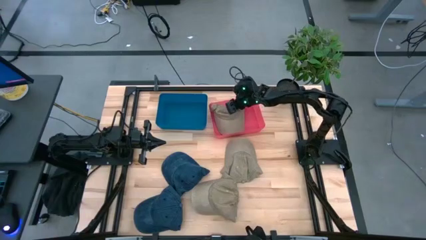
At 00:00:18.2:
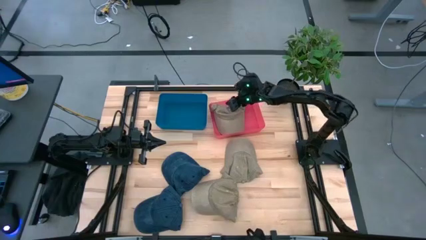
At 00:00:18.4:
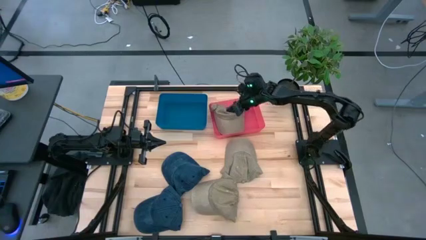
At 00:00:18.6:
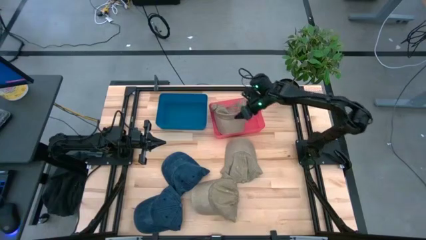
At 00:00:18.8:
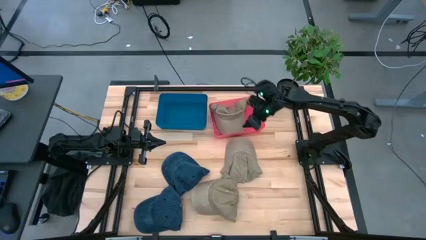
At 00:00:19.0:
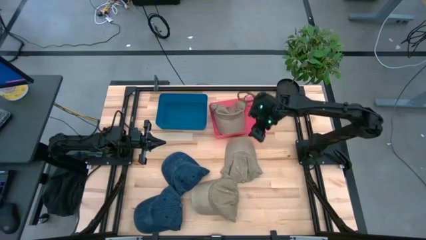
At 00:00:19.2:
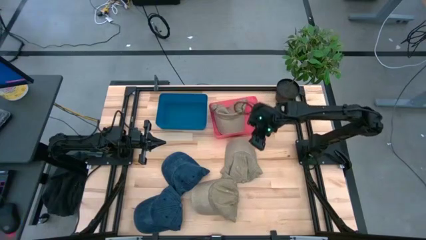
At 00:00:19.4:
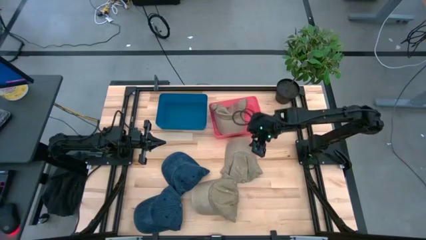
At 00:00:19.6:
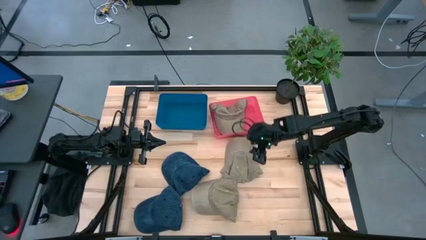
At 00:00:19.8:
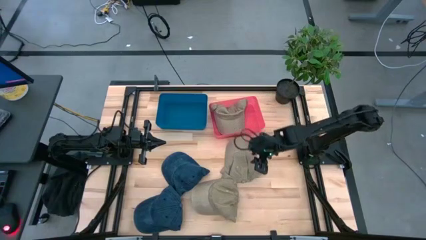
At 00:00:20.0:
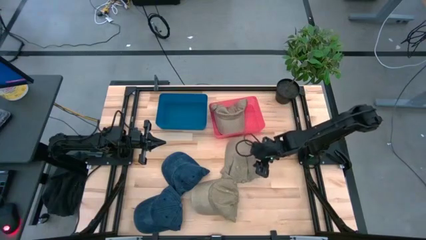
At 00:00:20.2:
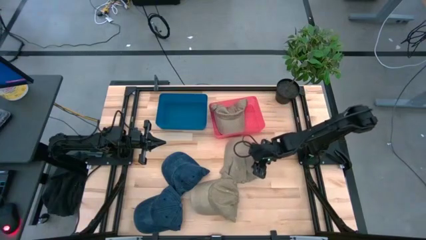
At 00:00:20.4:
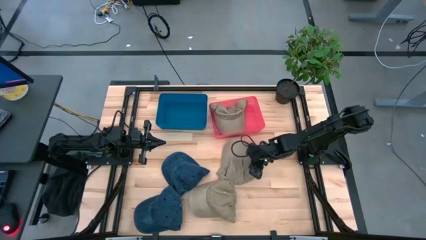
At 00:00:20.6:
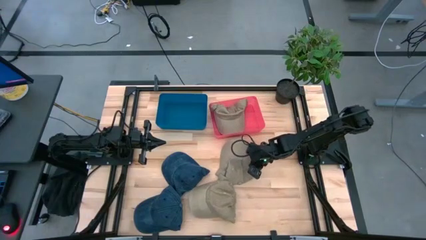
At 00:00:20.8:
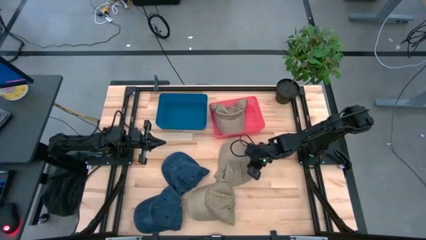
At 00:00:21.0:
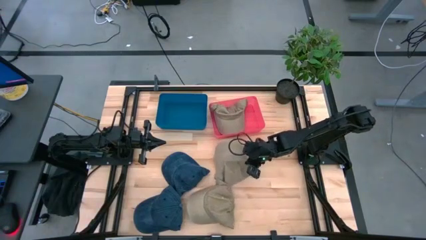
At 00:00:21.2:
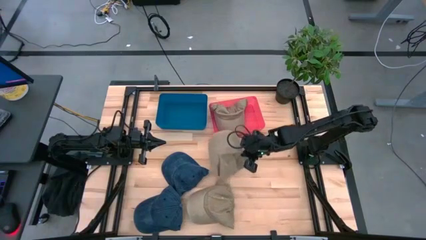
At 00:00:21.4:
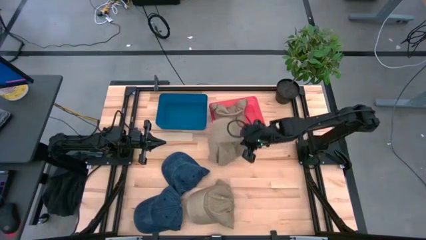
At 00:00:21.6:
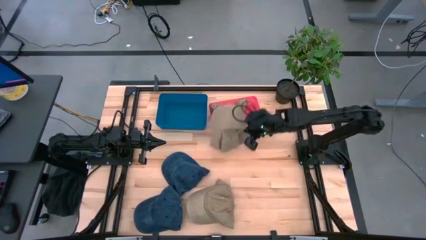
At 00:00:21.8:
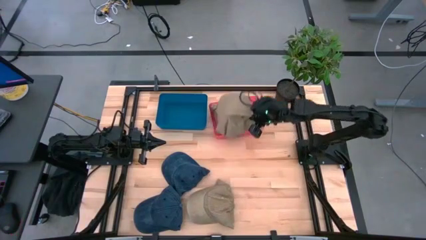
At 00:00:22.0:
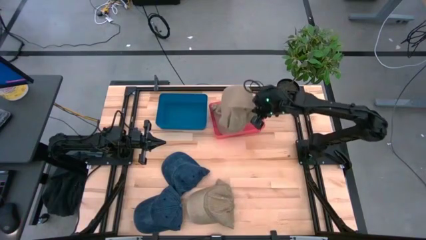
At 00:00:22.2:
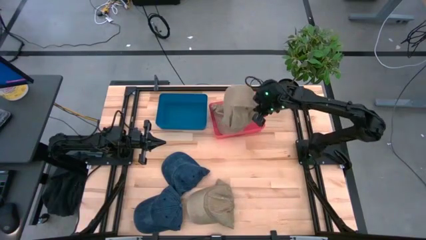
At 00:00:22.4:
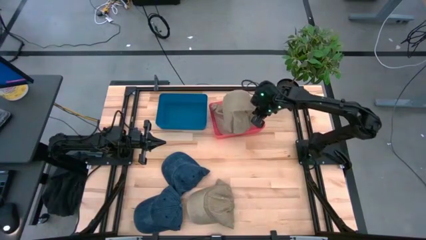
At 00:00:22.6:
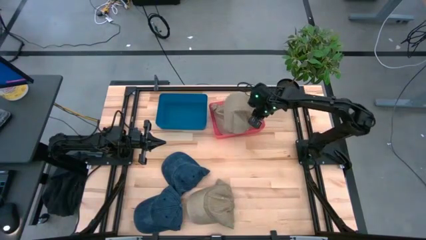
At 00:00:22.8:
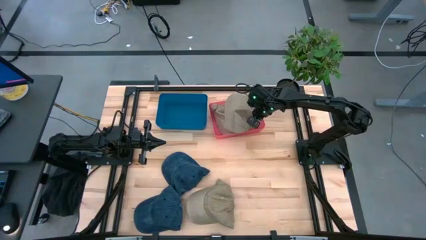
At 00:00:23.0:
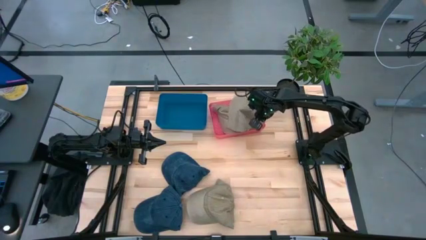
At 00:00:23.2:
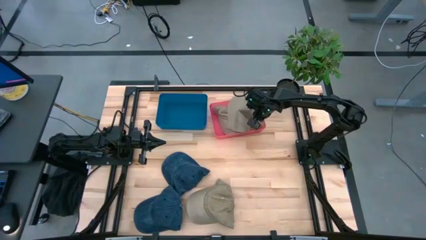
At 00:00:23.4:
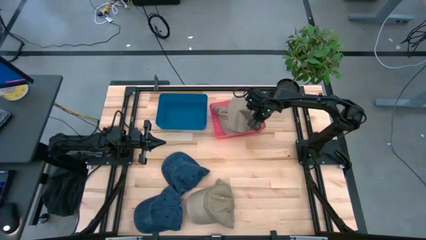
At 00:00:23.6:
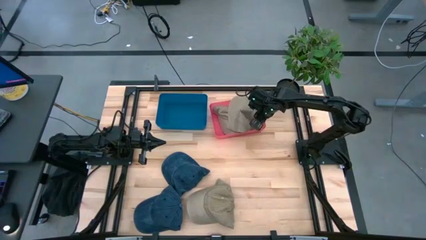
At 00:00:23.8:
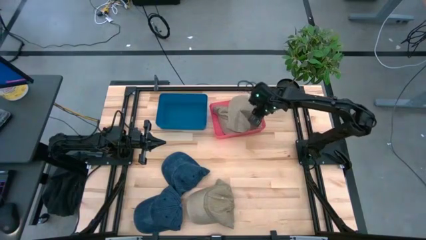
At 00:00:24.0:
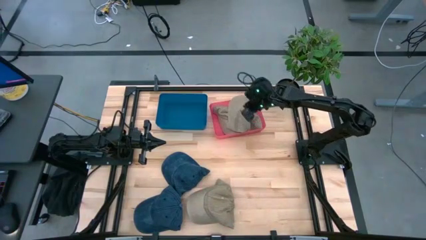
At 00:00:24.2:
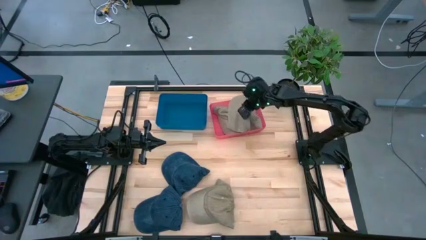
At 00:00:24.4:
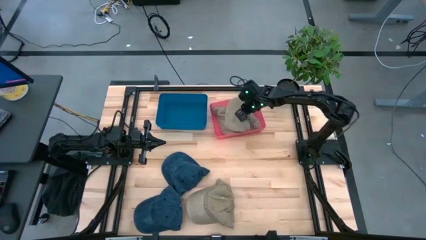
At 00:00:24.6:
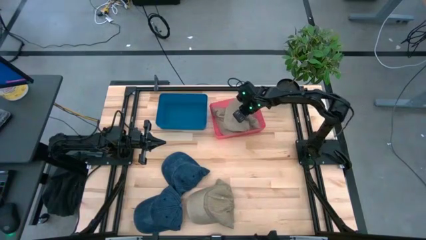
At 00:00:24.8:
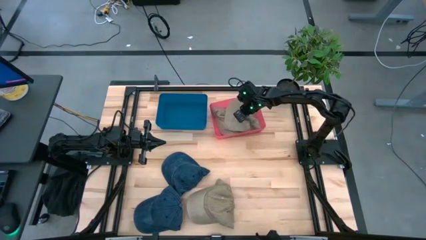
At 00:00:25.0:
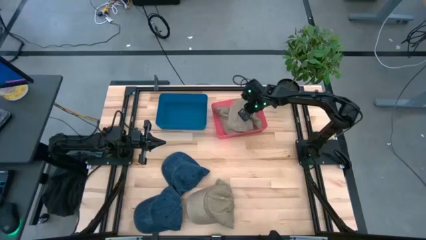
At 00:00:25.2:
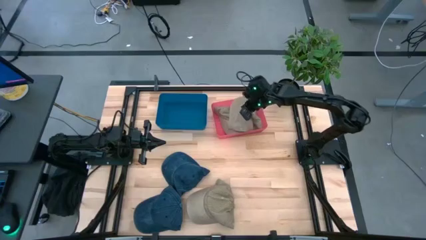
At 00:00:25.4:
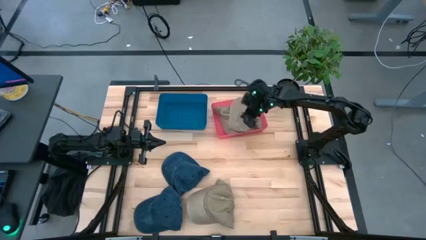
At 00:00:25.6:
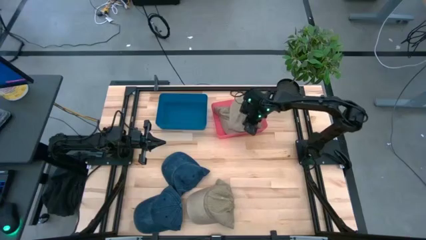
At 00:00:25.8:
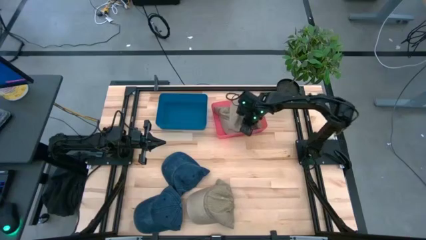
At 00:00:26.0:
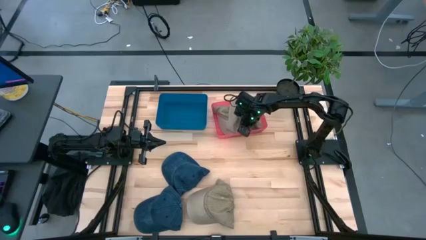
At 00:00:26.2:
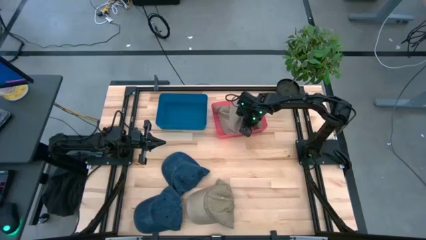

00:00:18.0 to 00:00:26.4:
Task: Pick & Place hat
Put the top brown cap into the pink bin
